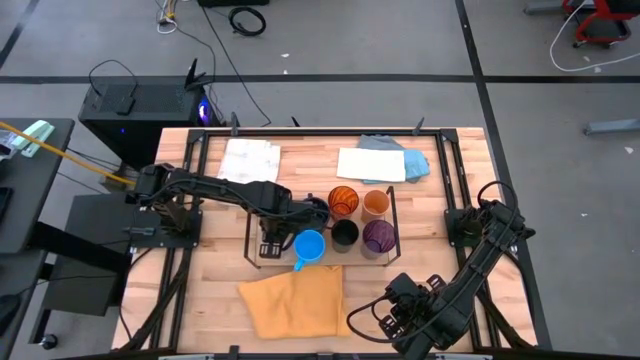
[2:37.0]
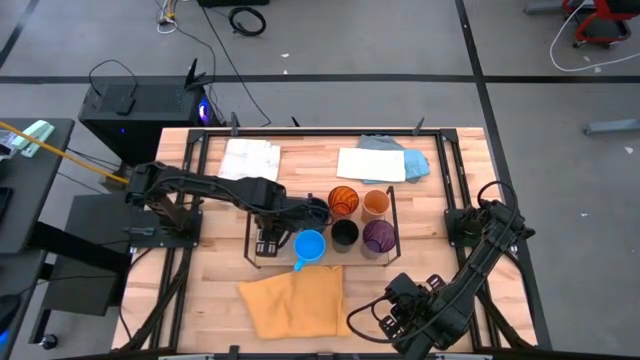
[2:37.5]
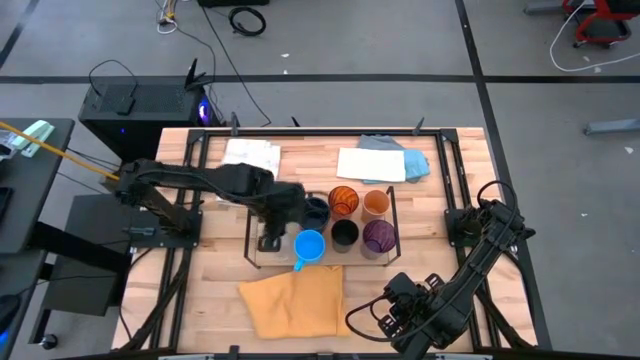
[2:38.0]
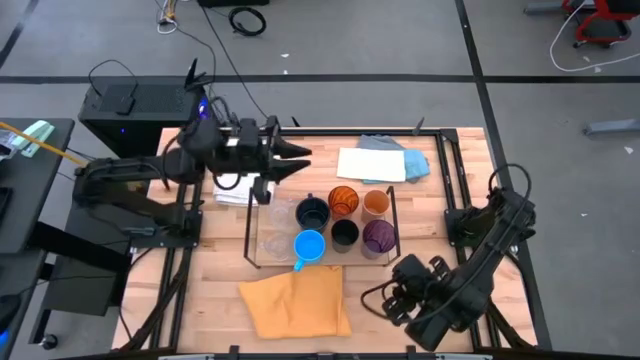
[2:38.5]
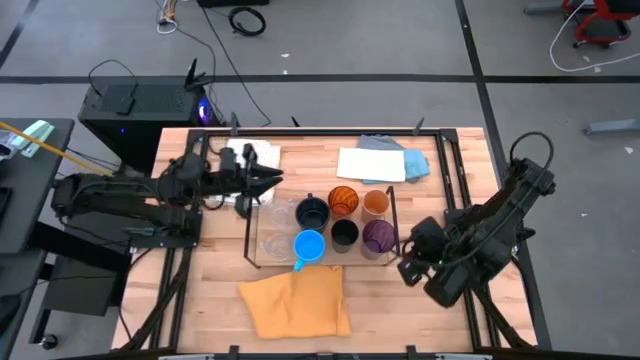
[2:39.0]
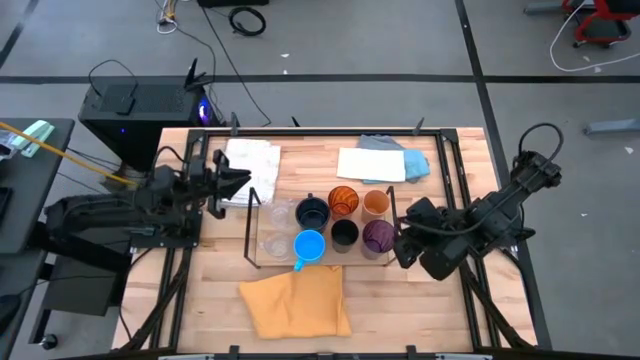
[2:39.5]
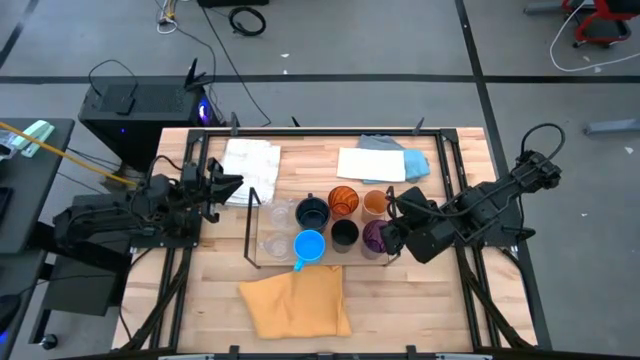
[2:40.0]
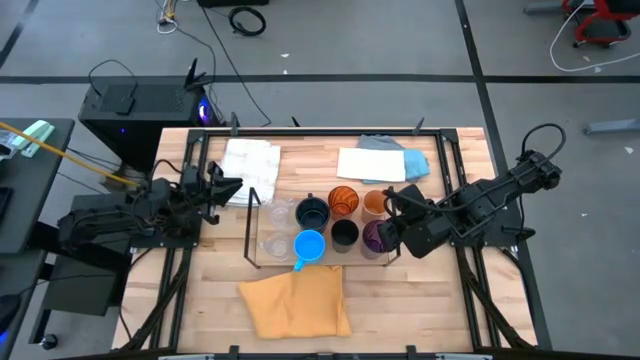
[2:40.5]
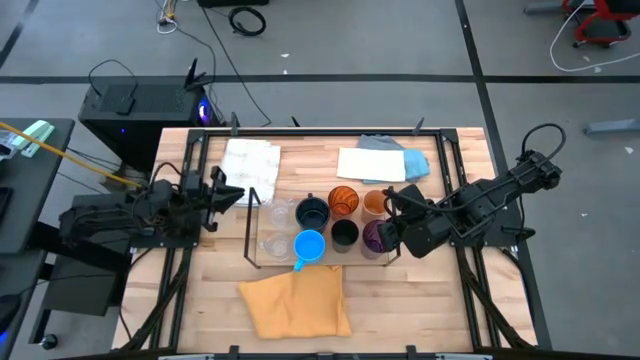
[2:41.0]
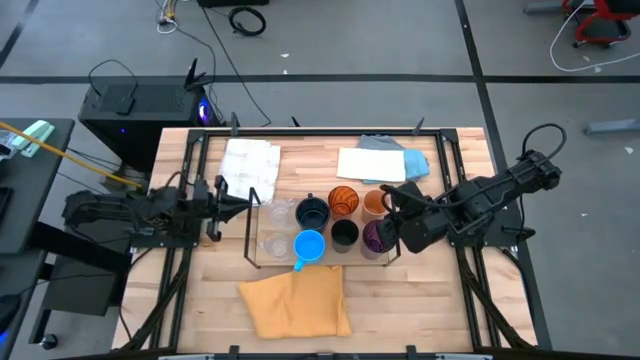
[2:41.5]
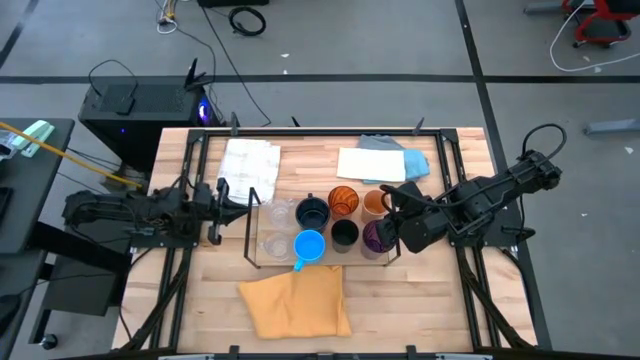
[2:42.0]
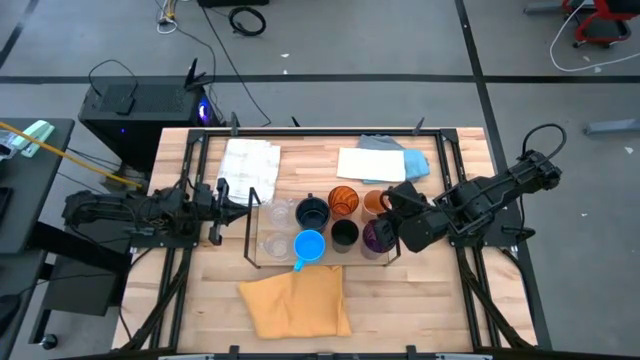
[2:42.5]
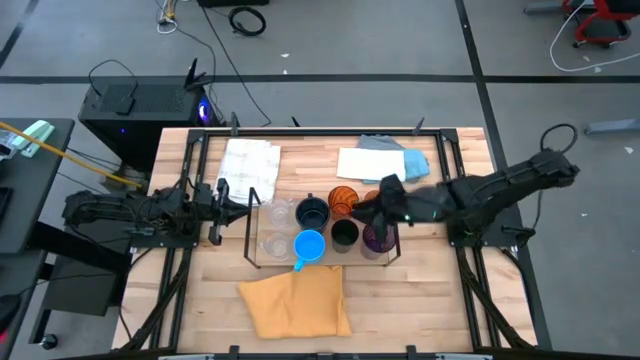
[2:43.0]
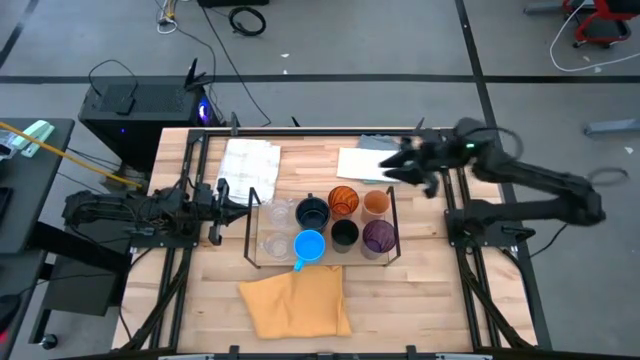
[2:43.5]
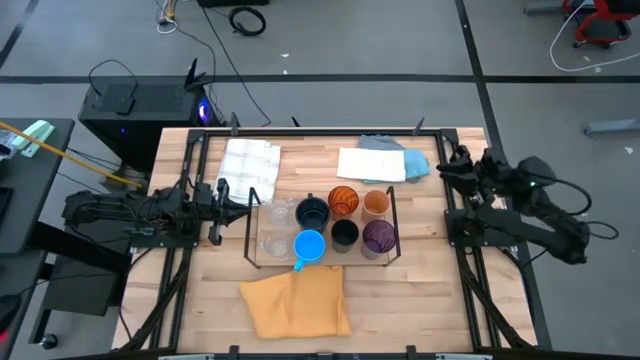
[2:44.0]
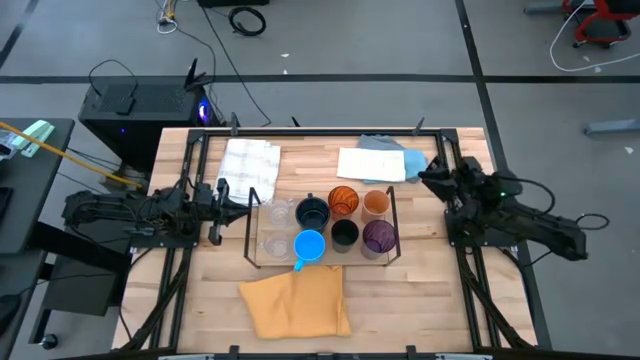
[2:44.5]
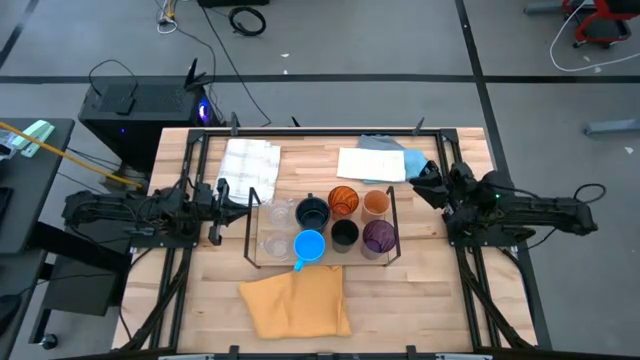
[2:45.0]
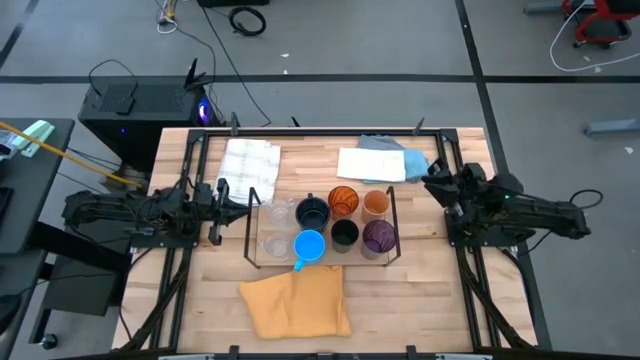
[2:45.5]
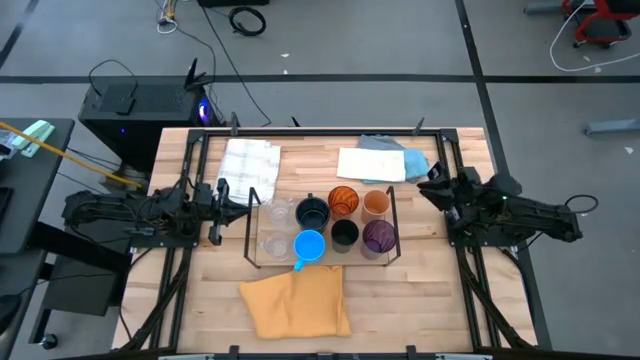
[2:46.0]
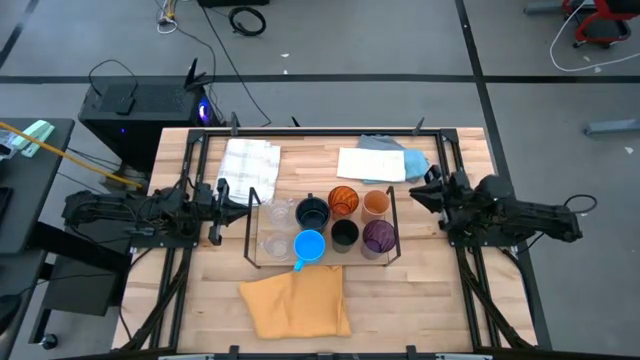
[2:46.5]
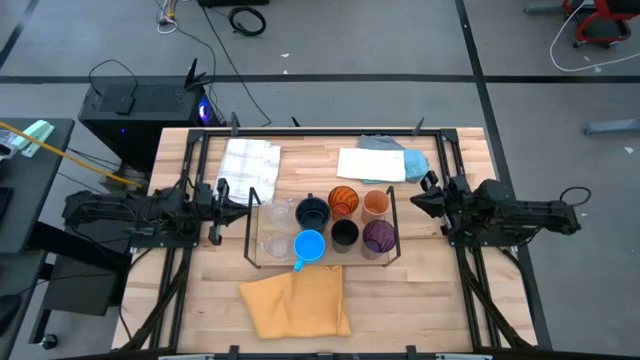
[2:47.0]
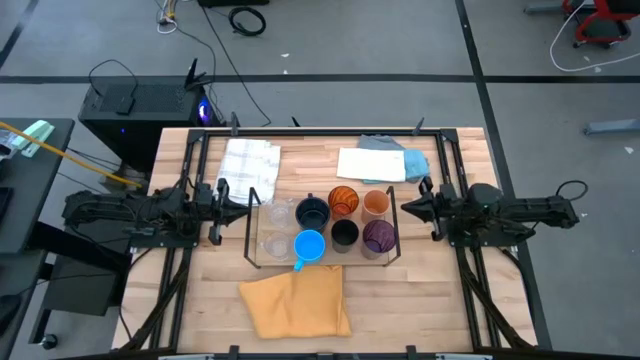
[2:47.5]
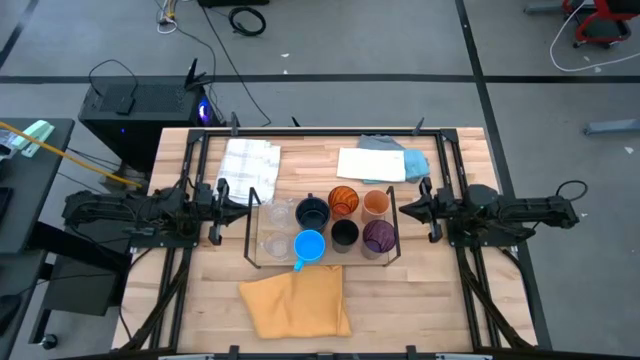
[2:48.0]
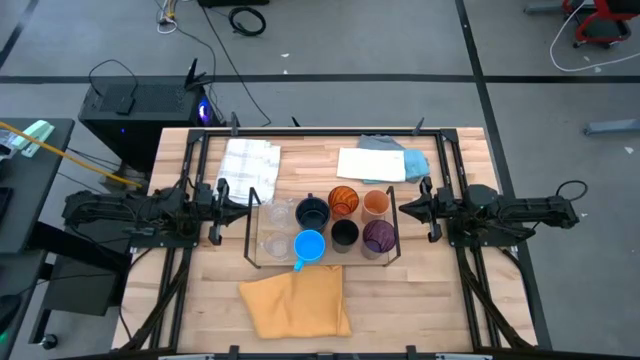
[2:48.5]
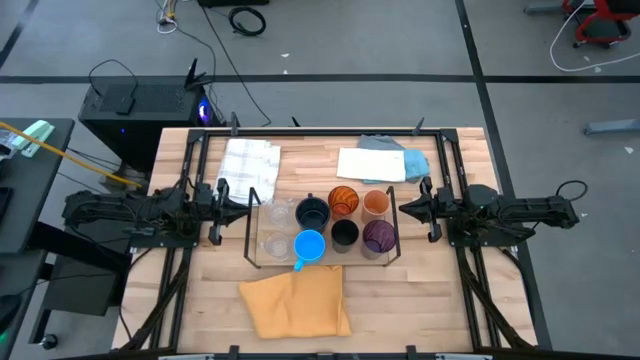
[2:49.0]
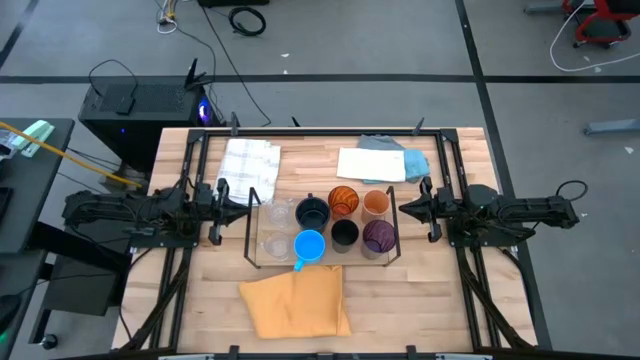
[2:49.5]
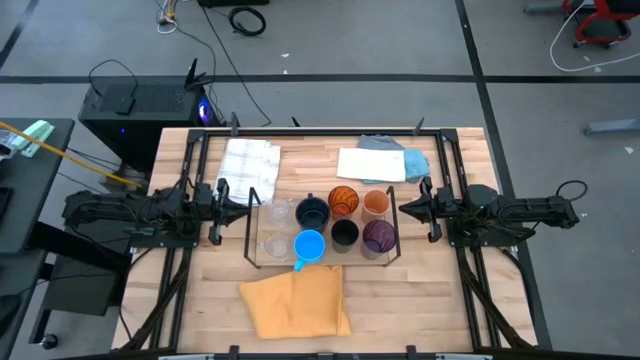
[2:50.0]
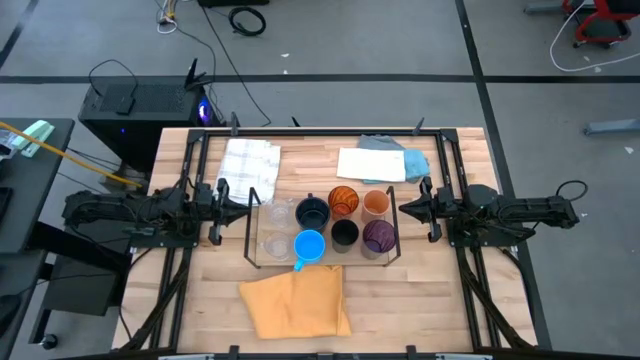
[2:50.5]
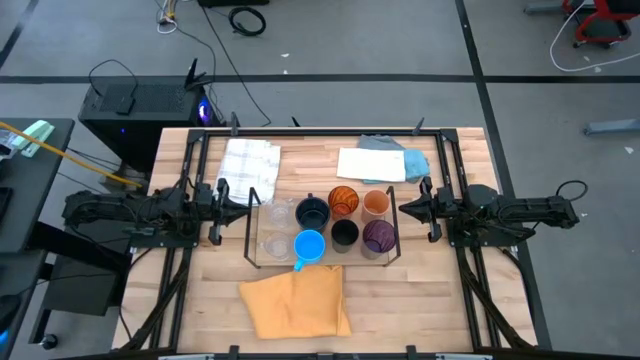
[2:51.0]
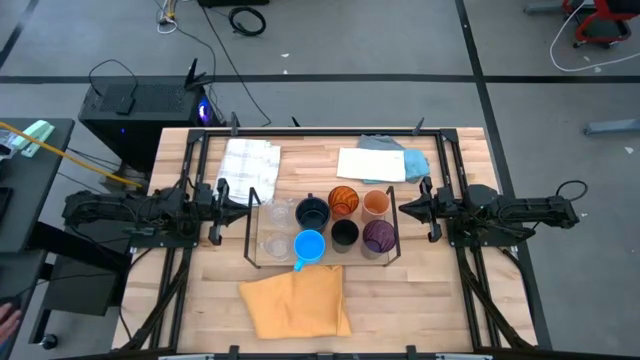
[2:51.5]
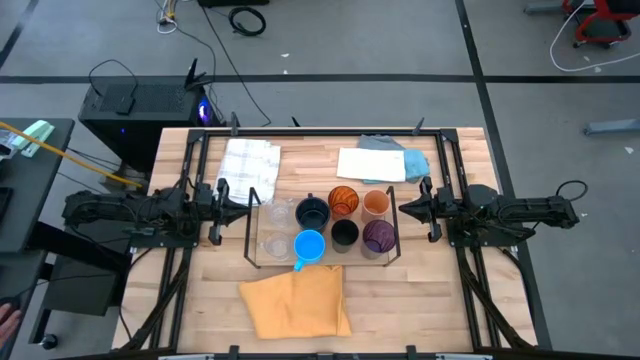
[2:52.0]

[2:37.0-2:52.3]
Task: Stack small to large cups/mugs on shelf
Return to Home Position

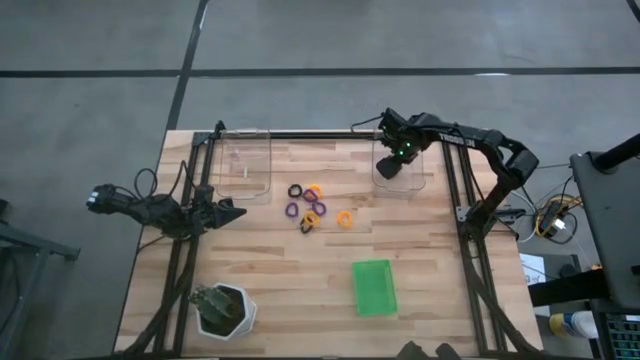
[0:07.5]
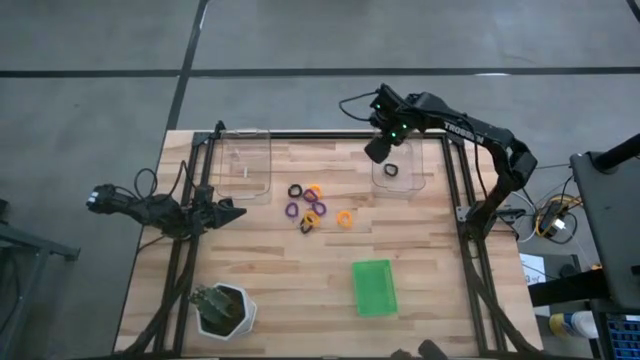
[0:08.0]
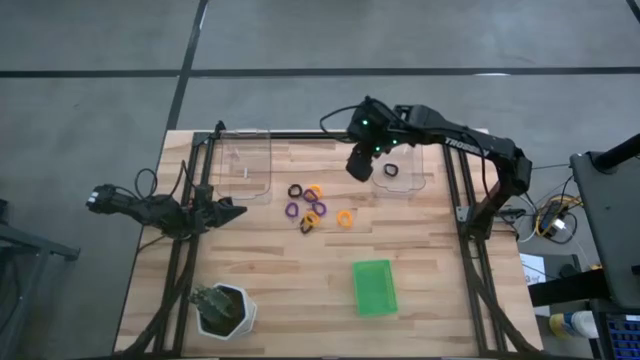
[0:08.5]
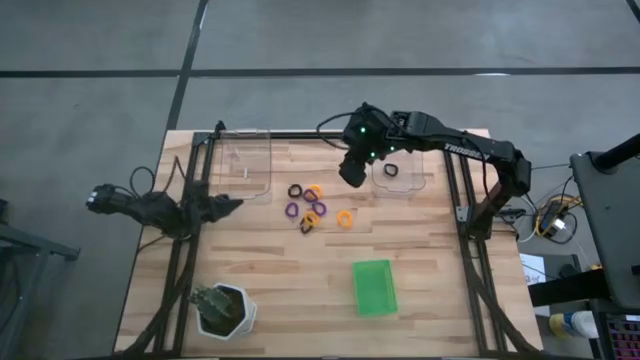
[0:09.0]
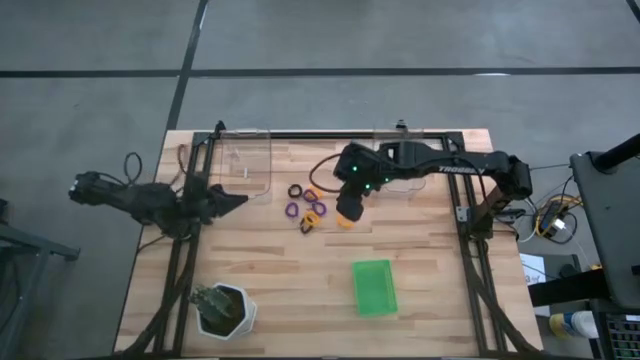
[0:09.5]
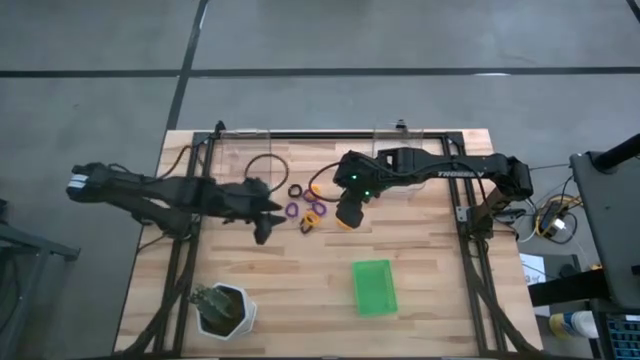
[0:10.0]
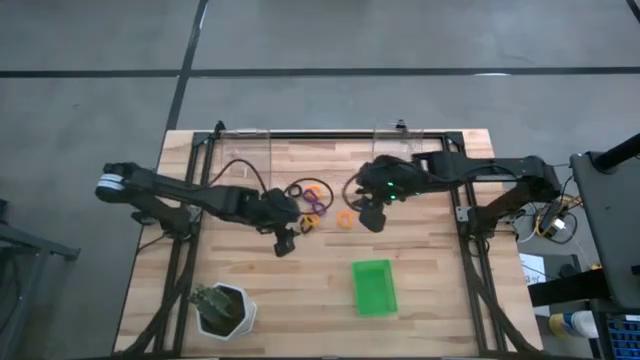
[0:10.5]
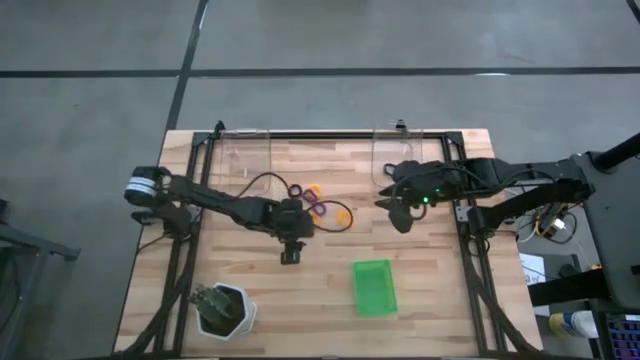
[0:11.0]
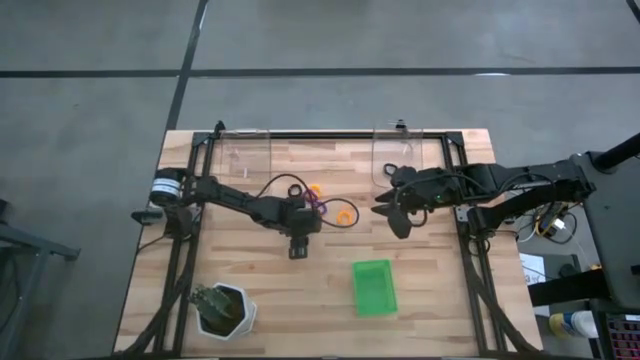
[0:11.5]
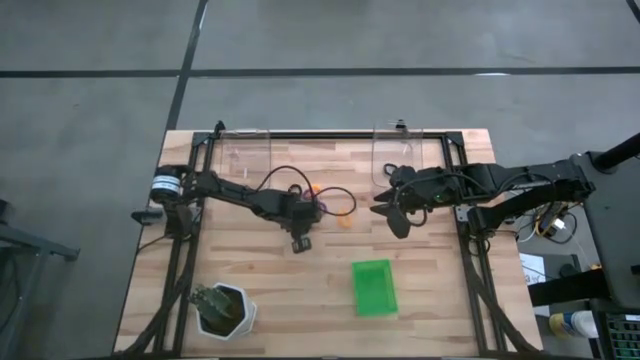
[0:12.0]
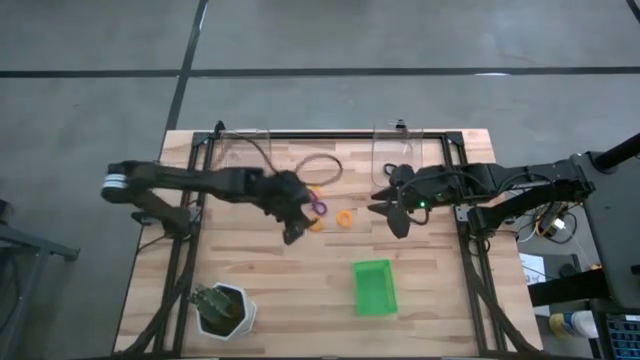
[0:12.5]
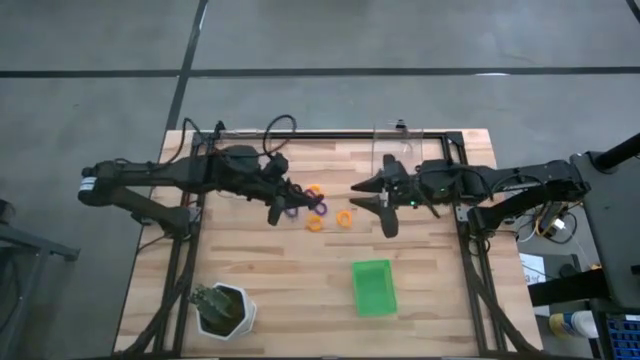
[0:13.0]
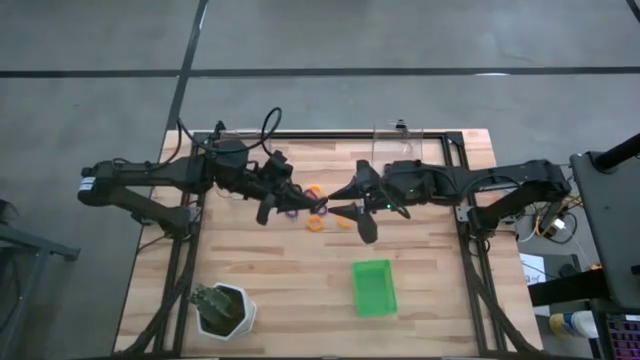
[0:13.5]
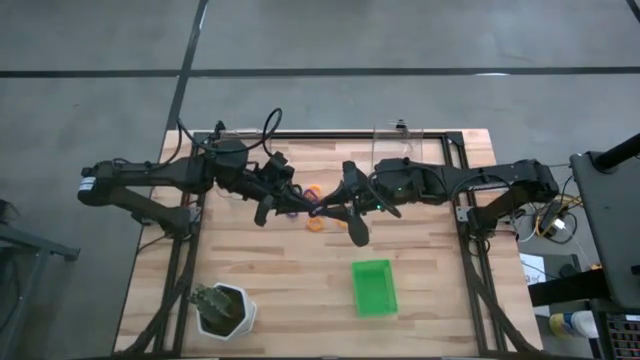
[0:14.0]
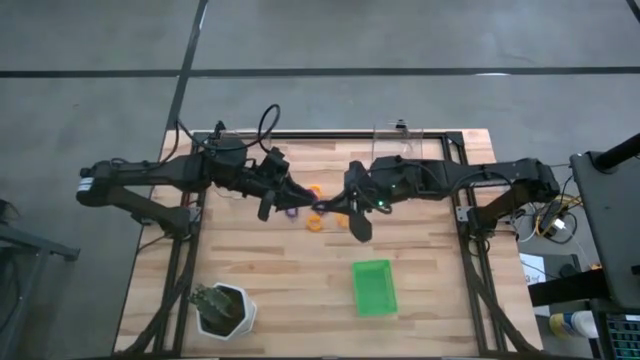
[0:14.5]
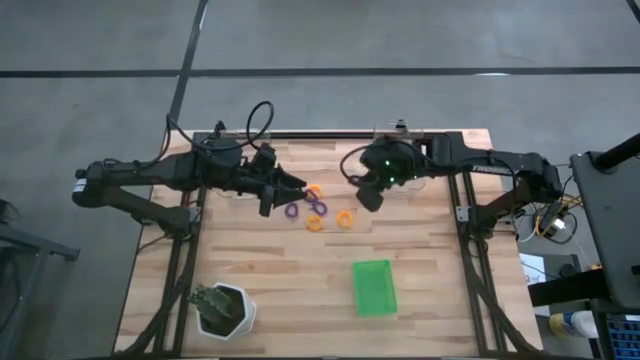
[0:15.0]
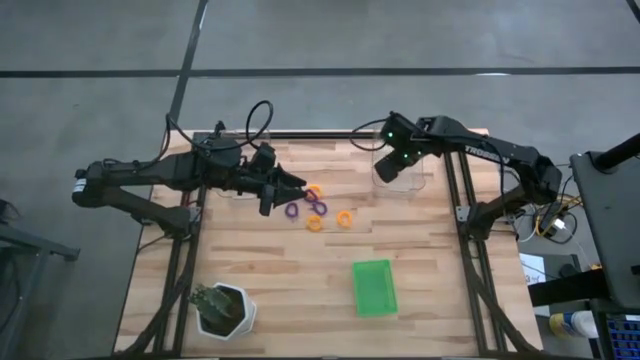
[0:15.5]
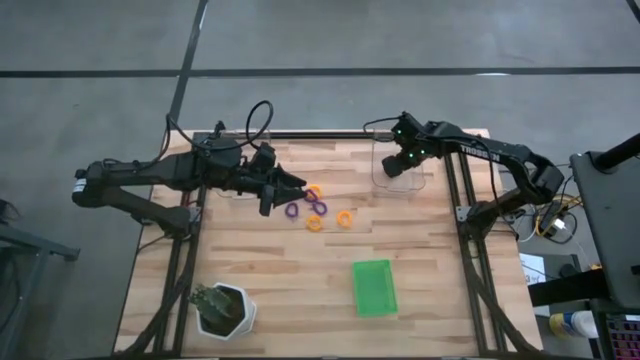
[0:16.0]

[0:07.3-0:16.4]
Task: Sort spring keychains
Put the bottom black spring keychain into the right transparent bin
